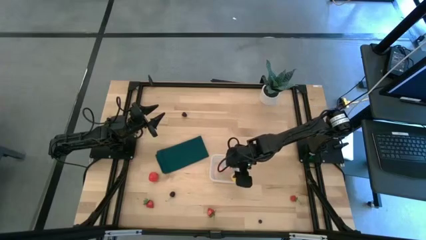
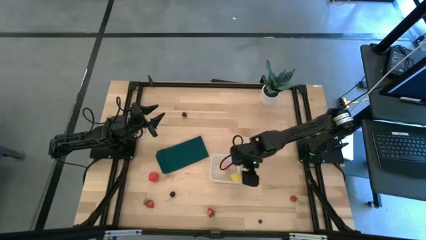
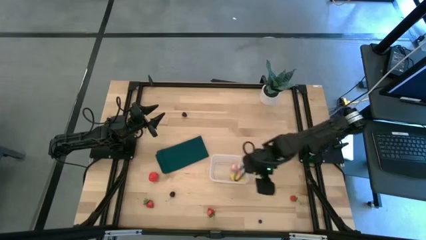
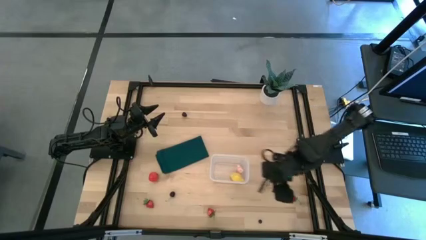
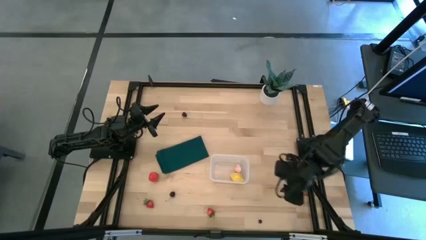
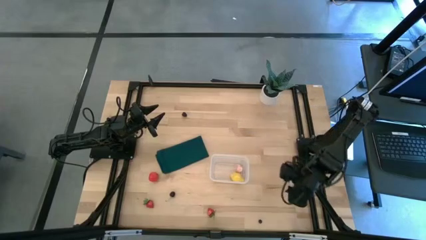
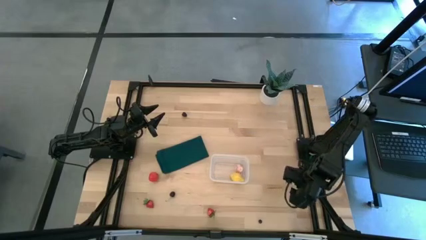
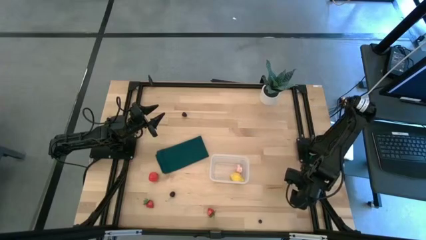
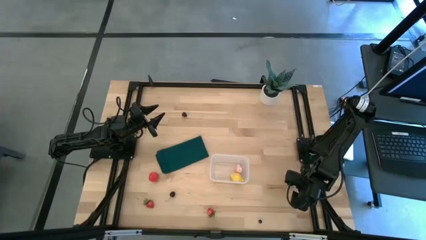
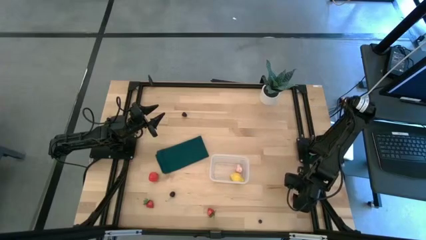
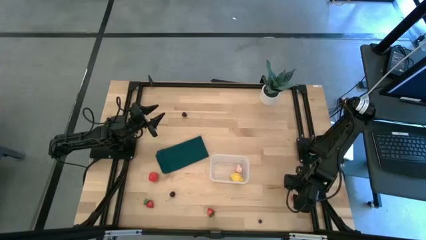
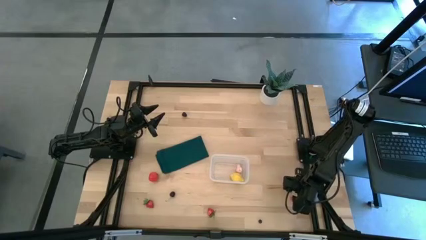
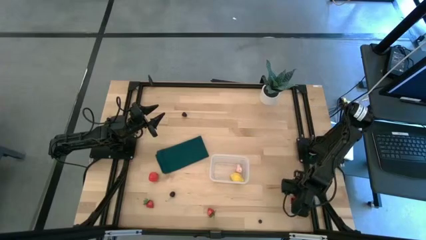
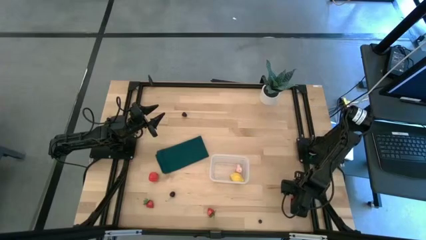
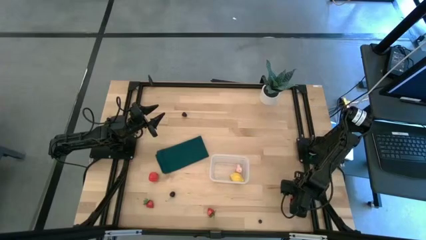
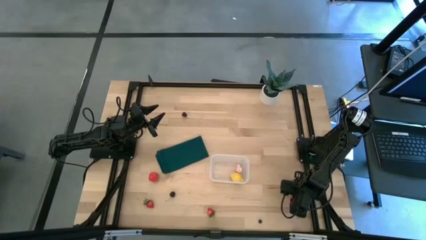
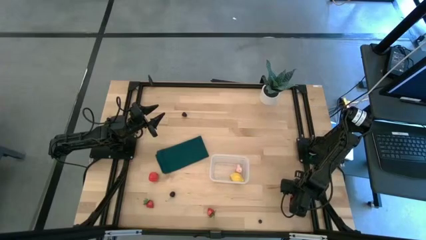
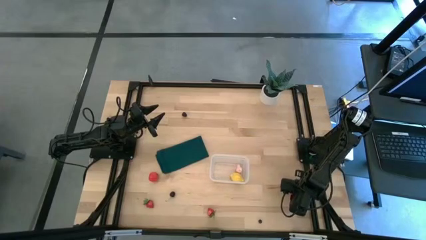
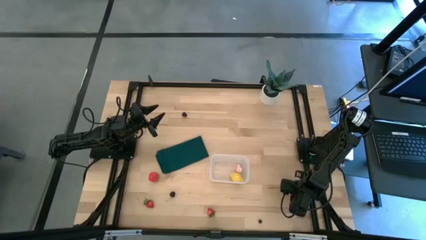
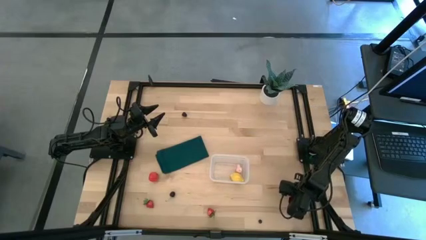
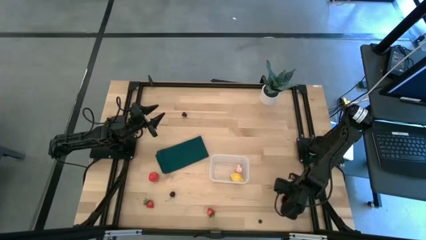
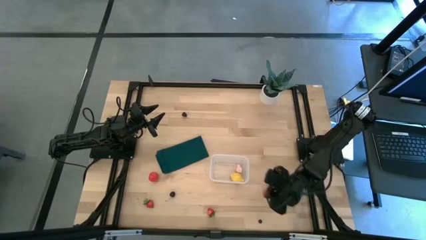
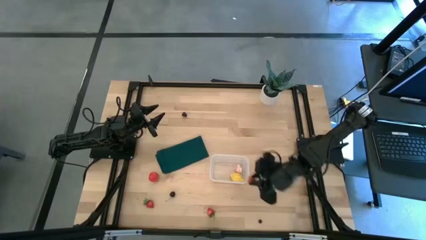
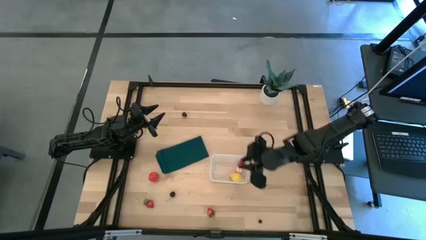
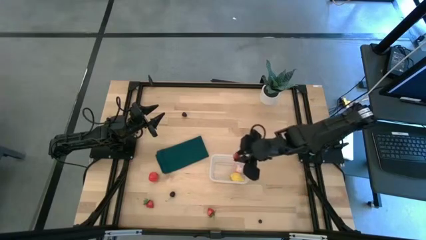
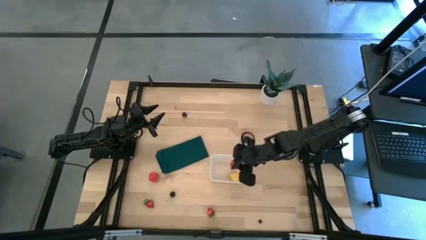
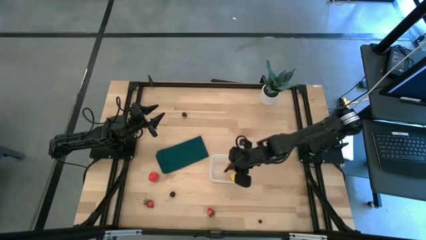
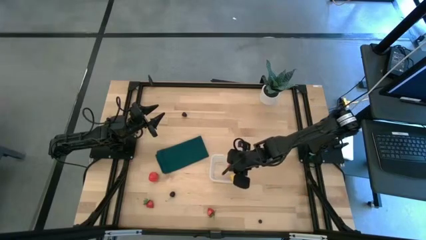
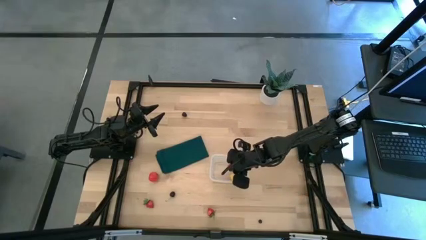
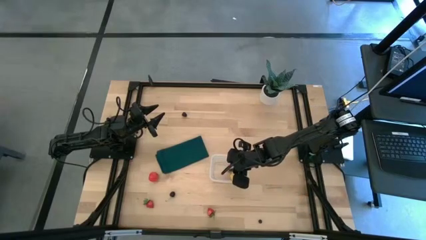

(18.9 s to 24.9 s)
Task: Pick and placing Produce into tupperware
Put the strawberry into the transparent bin

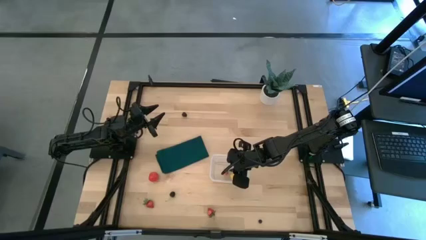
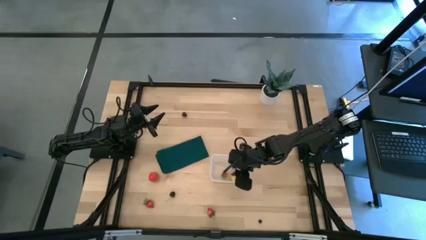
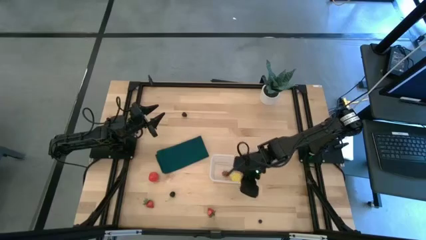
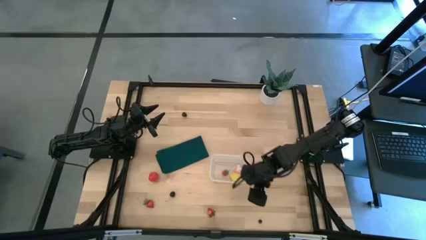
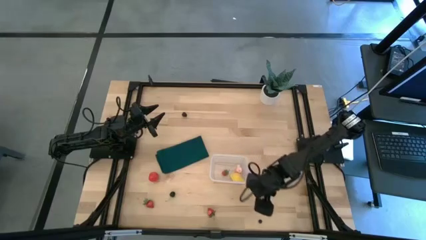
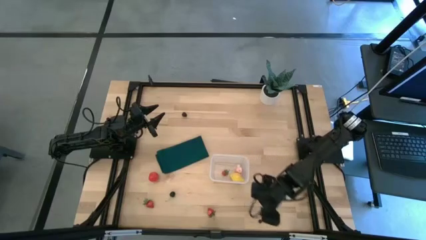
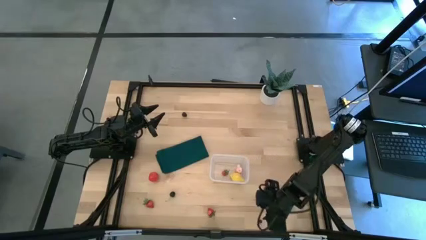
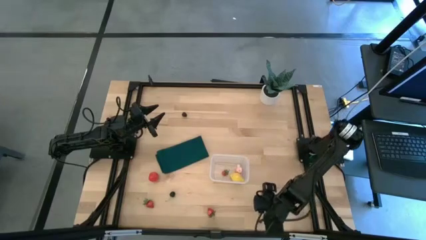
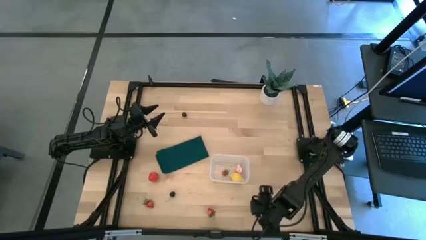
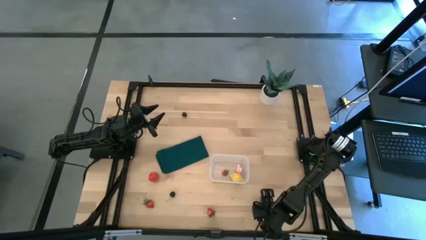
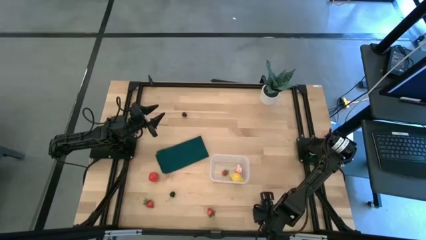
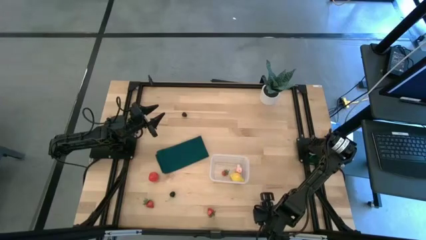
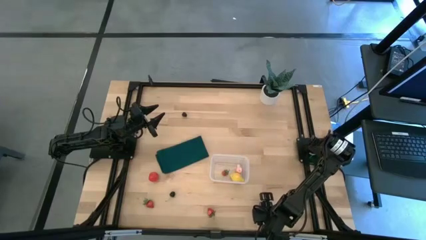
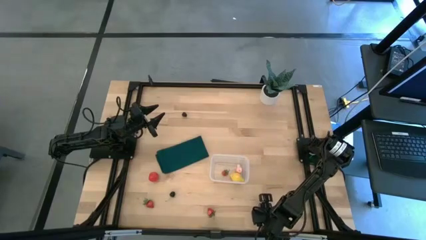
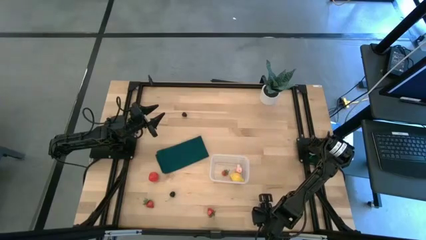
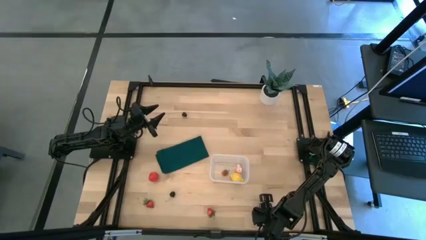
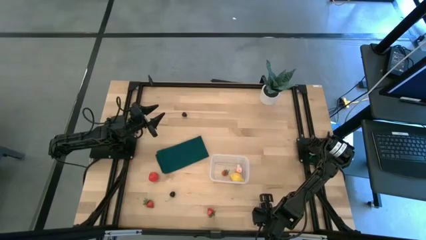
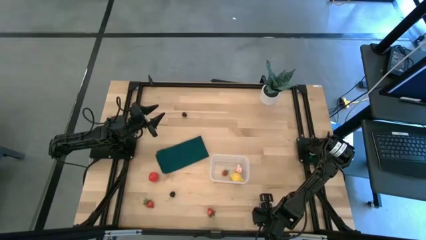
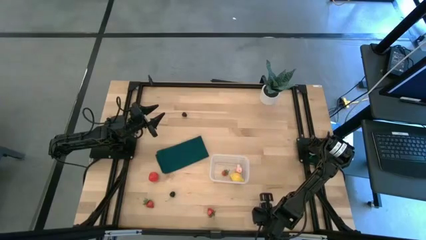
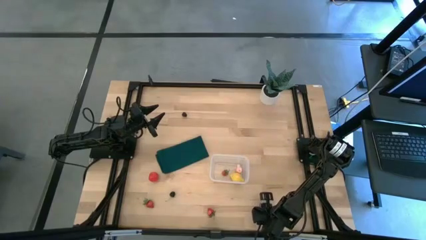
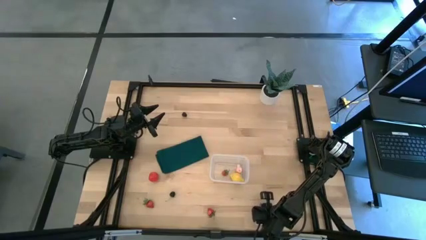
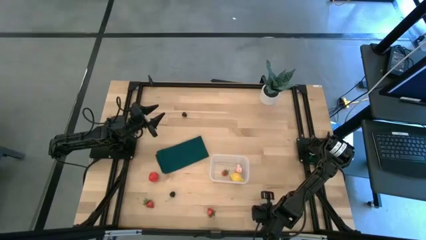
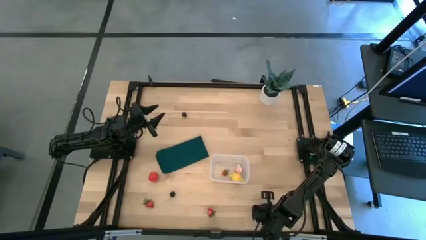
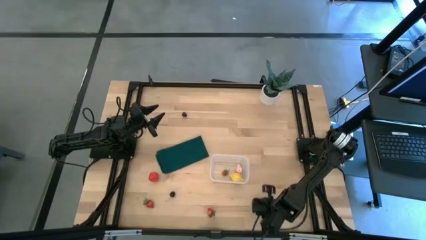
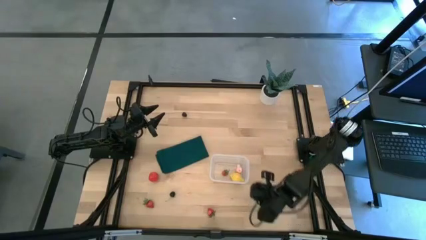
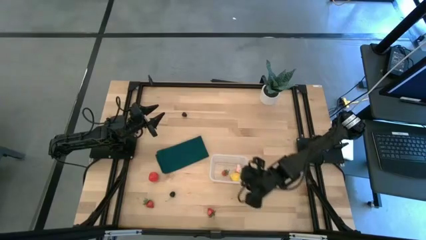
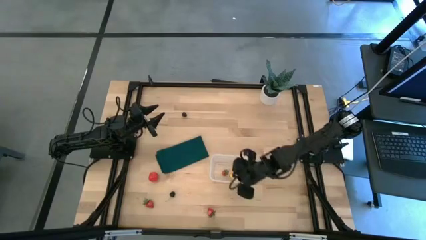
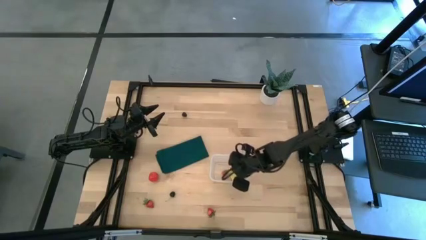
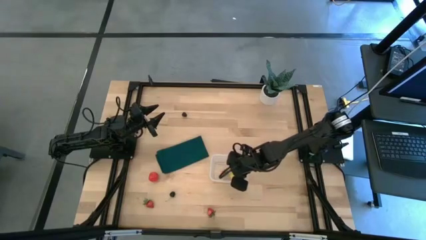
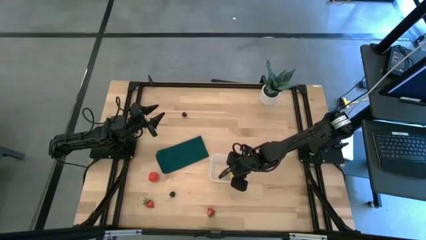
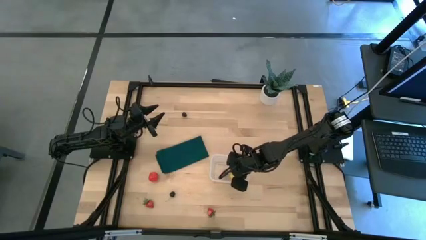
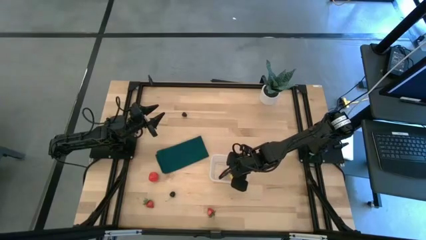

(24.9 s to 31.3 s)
Put the blueberry into the transparent bin

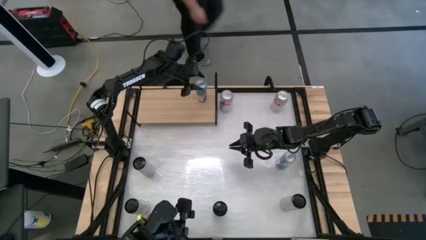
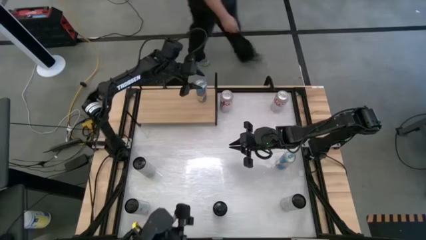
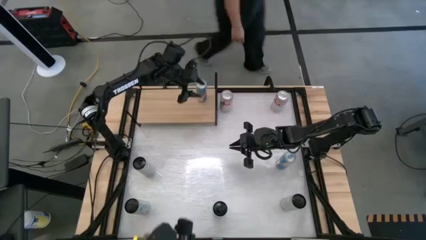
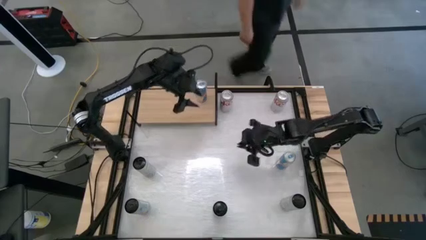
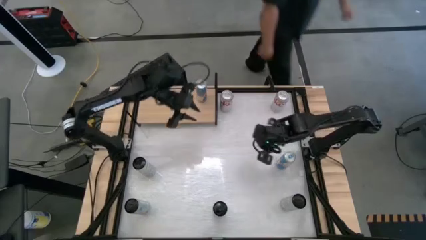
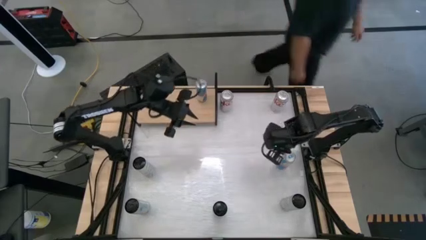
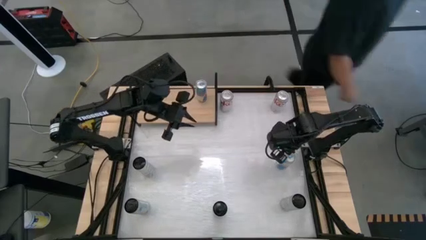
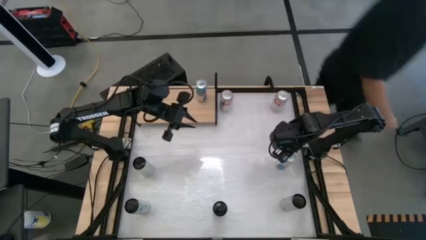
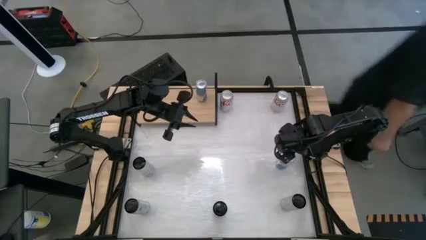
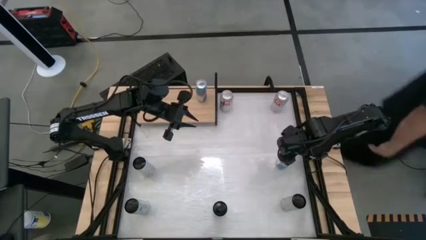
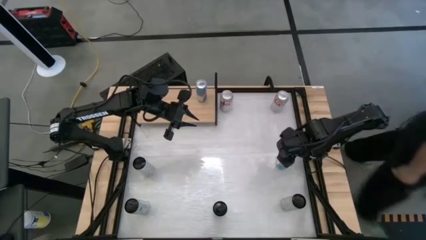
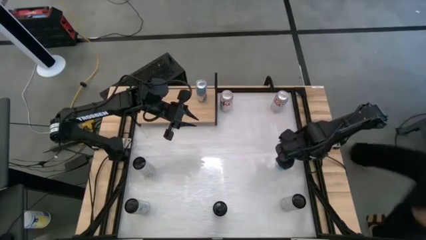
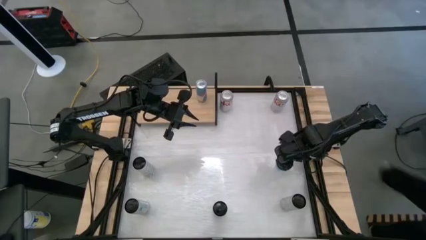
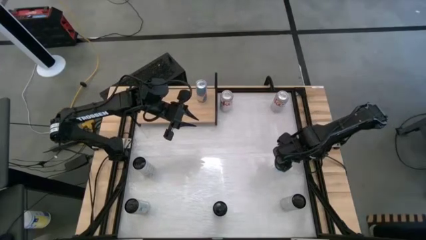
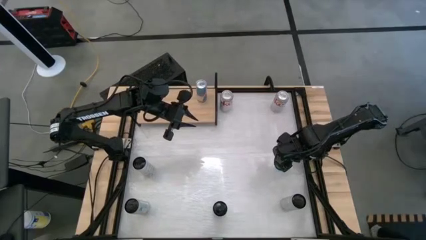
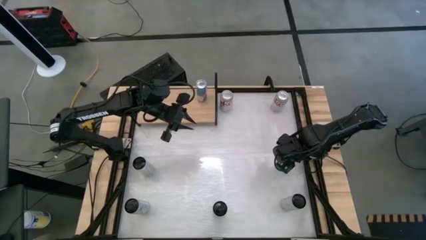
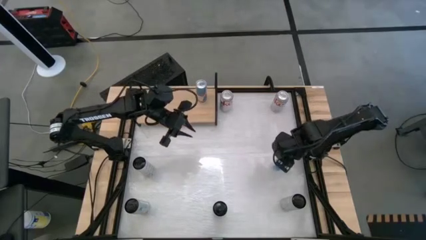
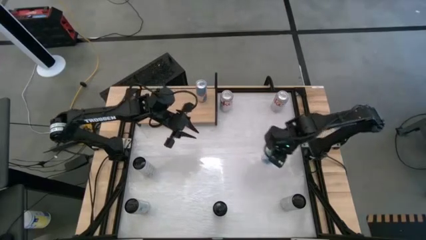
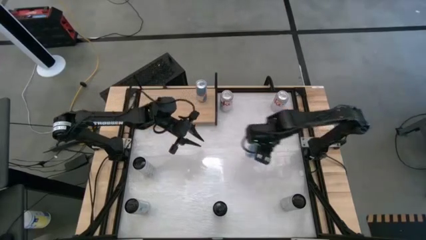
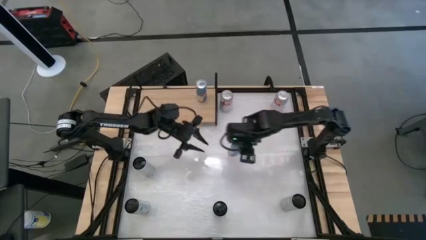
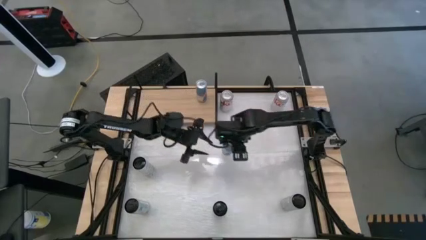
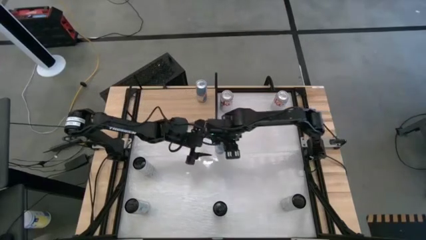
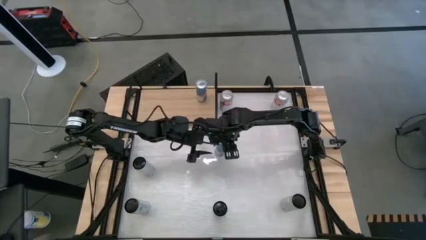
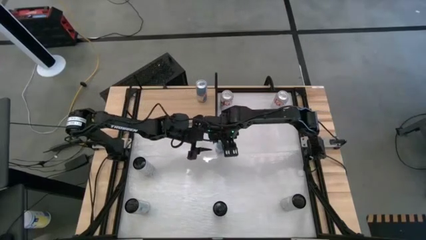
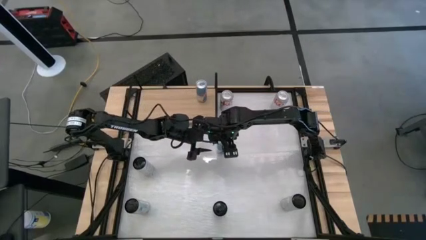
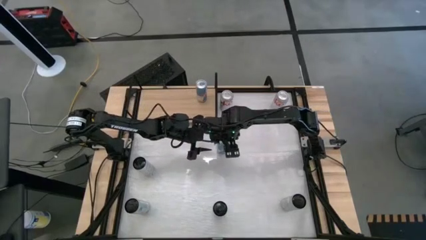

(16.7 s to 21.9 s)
Task: Place canned beverage on shelf
Move the blue soda to the center of the table
